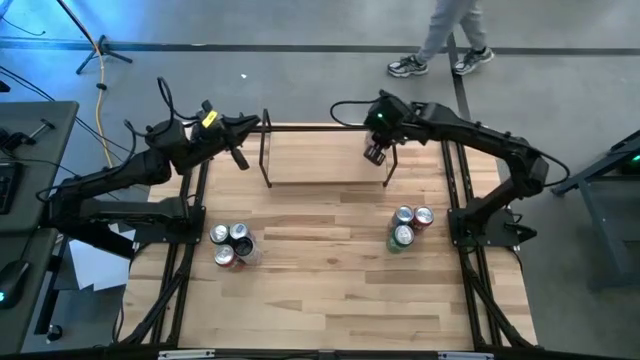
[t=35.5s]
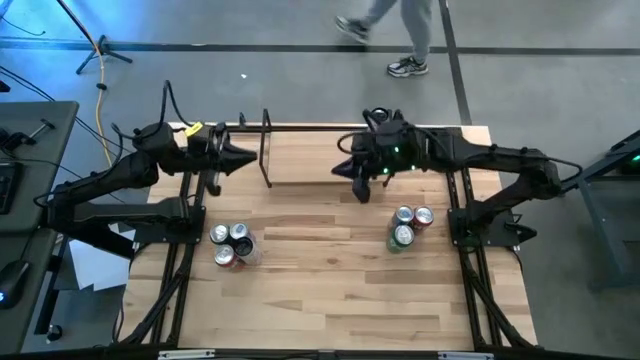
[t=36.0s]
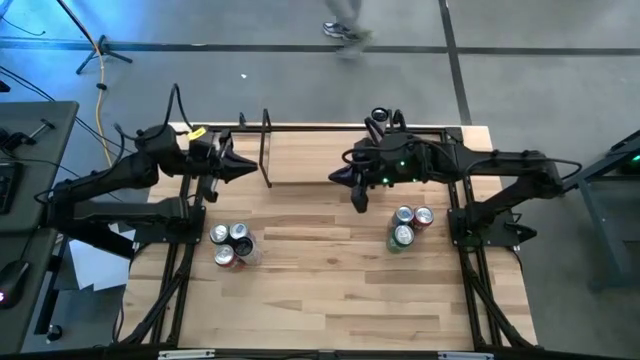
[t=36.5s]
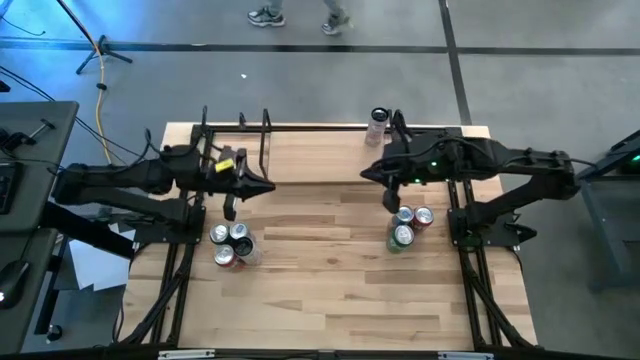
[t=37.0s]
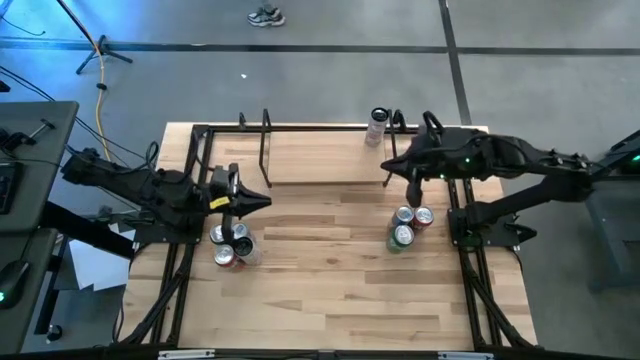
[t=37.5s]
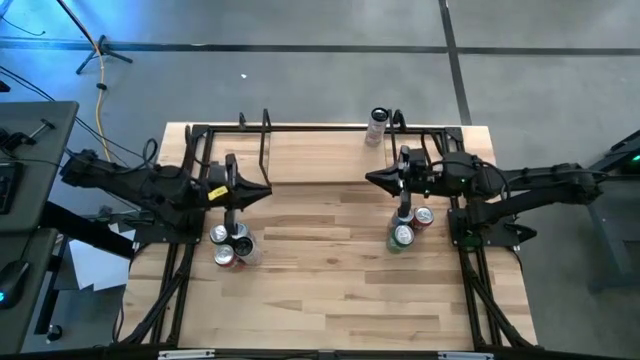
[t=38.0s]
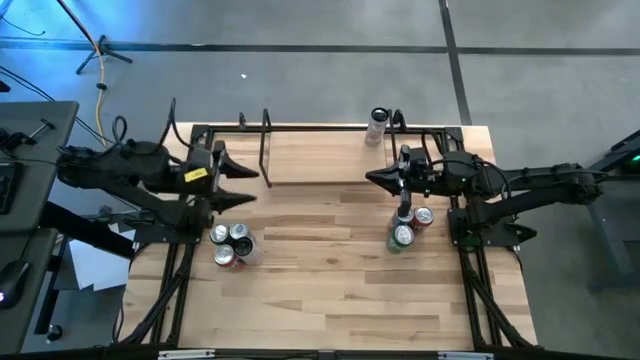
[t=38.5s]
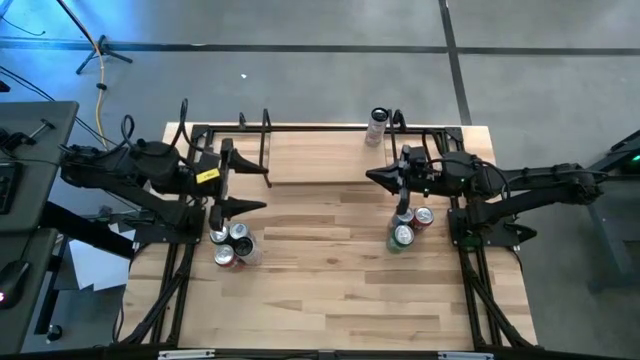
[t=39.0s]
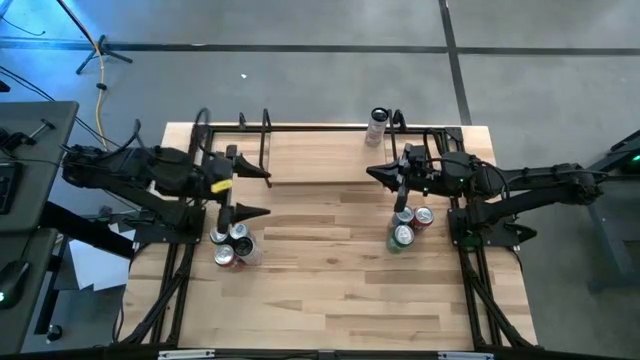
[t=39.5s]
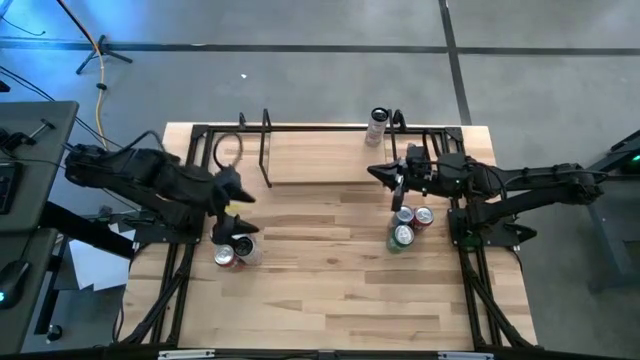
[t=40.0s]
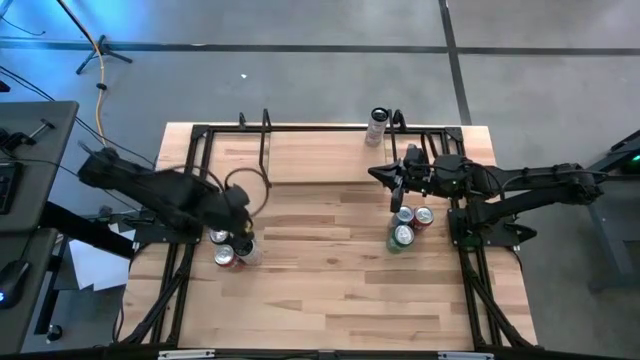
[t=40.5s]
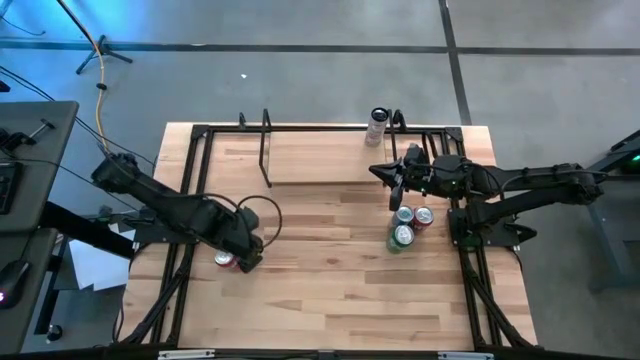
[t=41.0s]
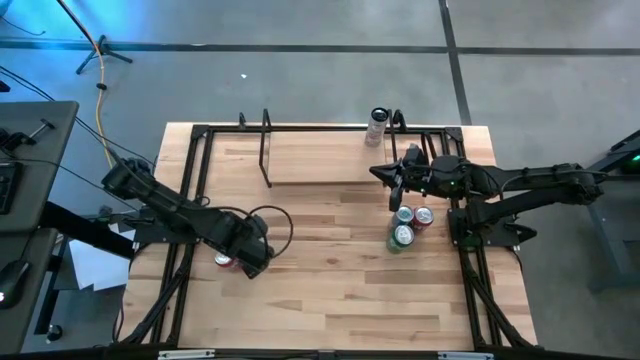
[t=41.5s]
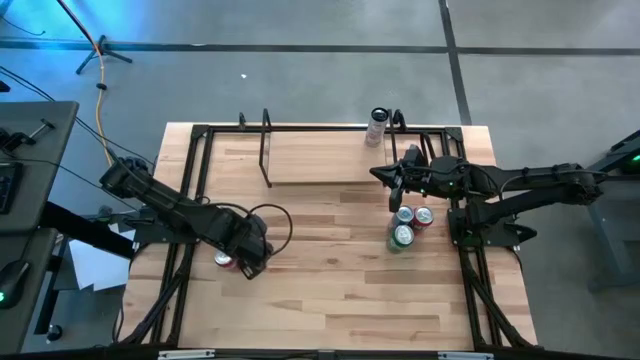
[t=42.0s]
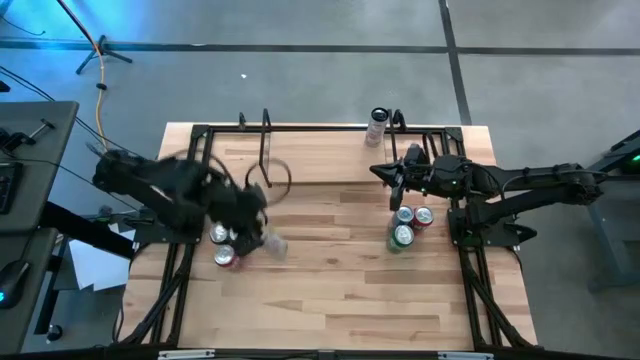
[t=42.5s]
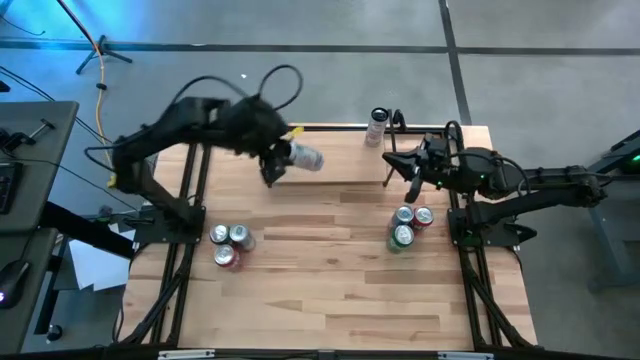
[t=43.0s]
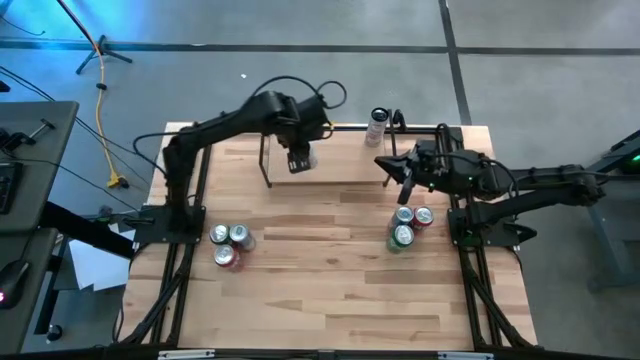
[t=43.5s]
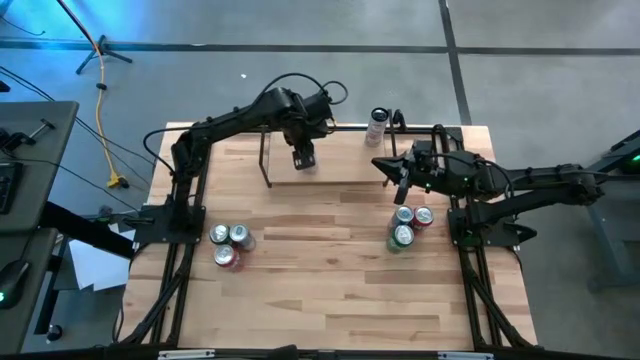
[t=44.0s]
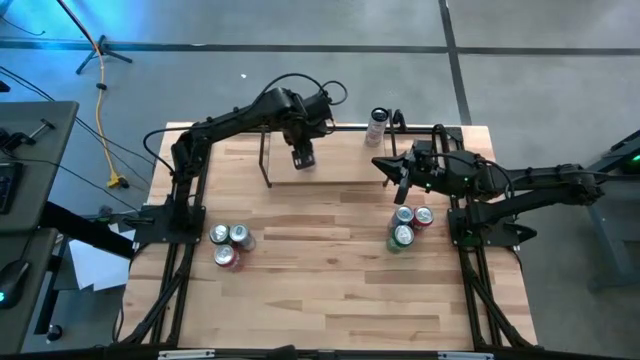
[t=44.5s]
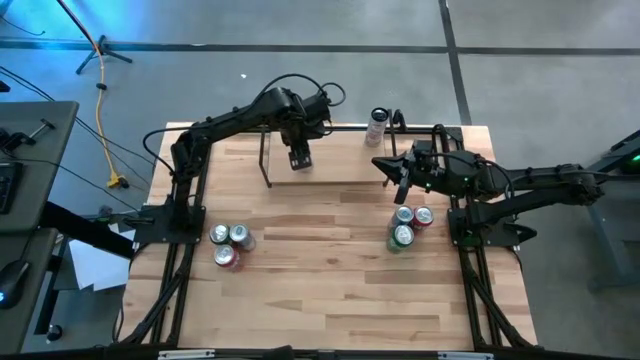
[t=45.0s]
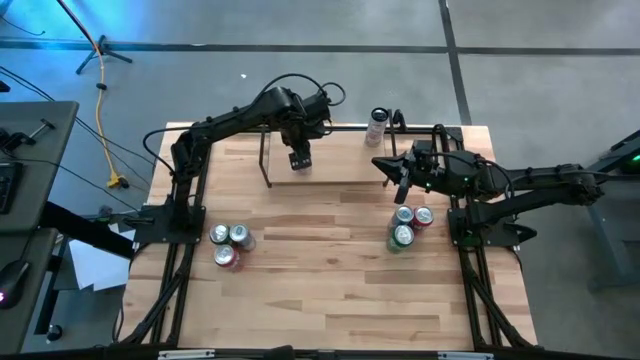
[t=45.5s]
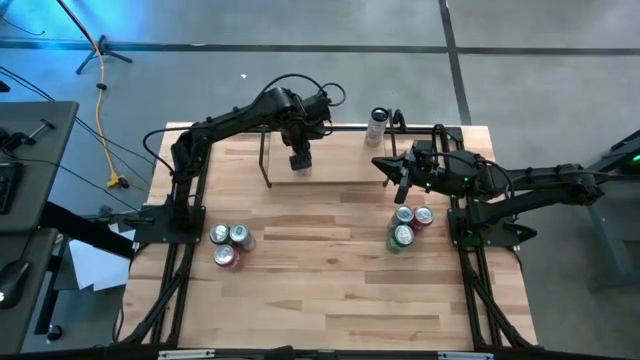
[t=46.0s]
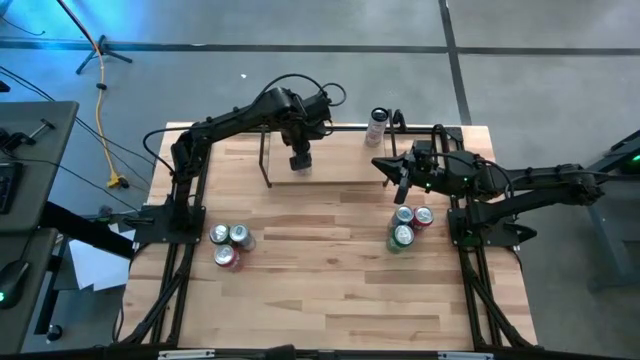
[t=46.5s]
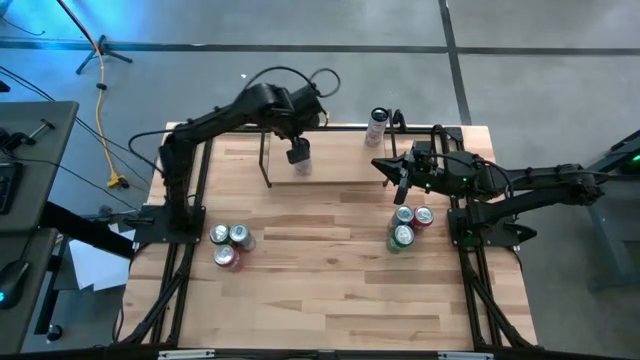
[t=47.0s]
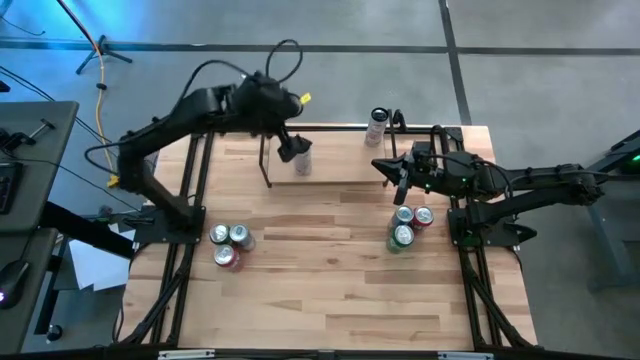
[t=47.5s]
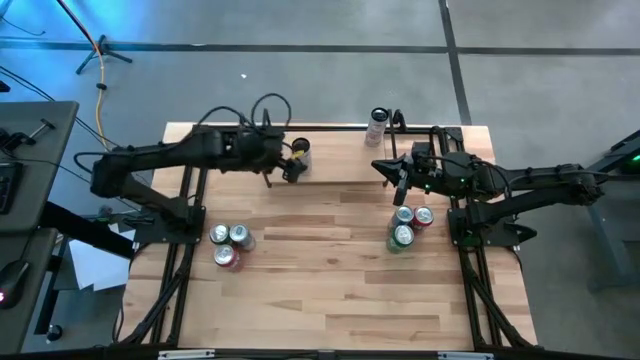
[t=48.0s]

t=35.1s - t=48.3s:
Task: Place canned beverage on shelf
Put the white soda can on the shelf and align it with the other white soda can

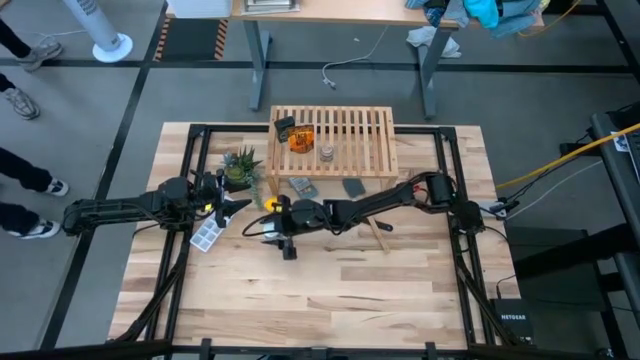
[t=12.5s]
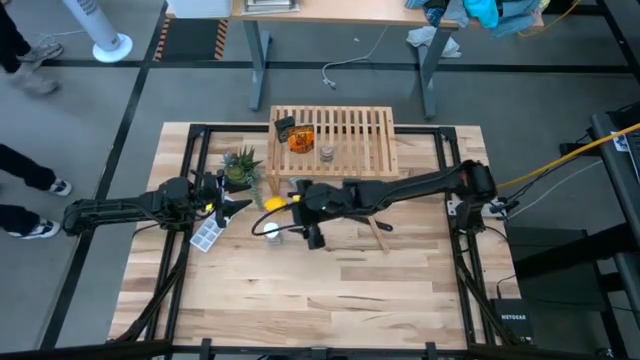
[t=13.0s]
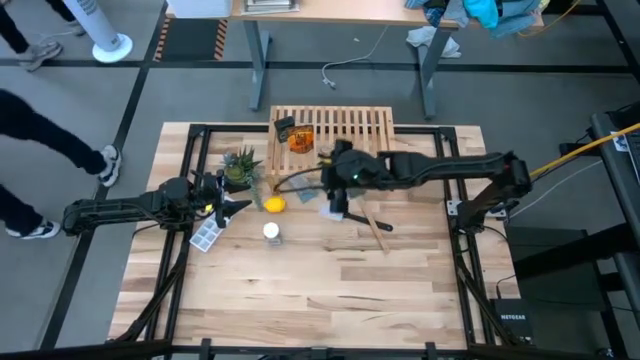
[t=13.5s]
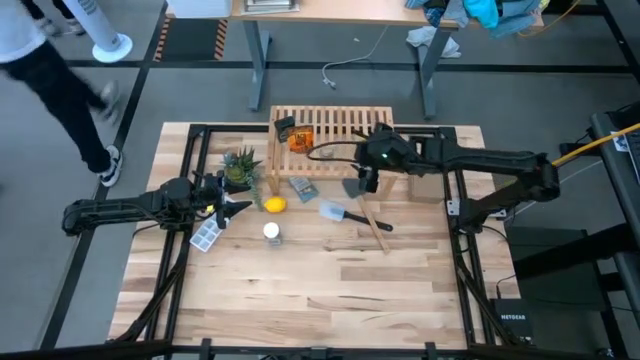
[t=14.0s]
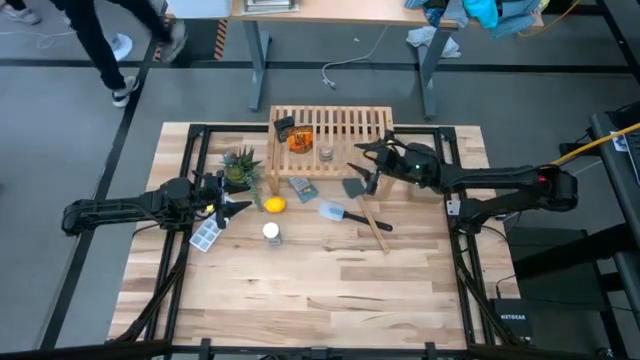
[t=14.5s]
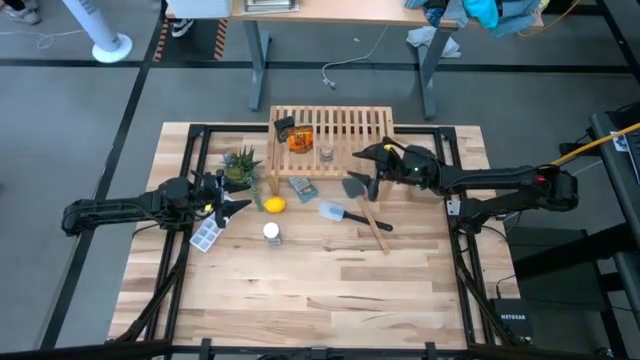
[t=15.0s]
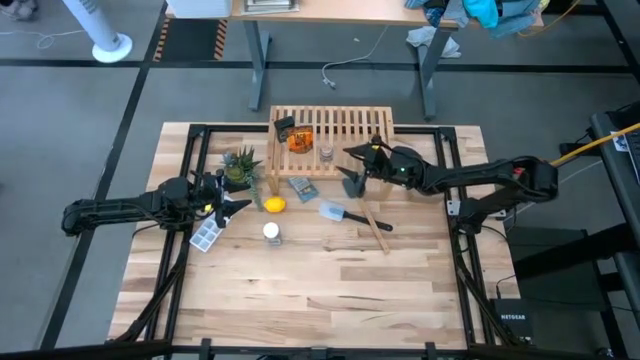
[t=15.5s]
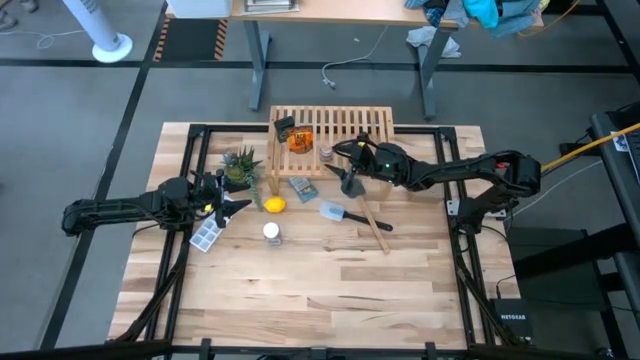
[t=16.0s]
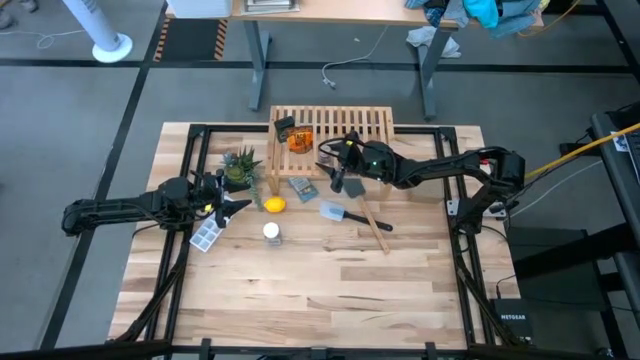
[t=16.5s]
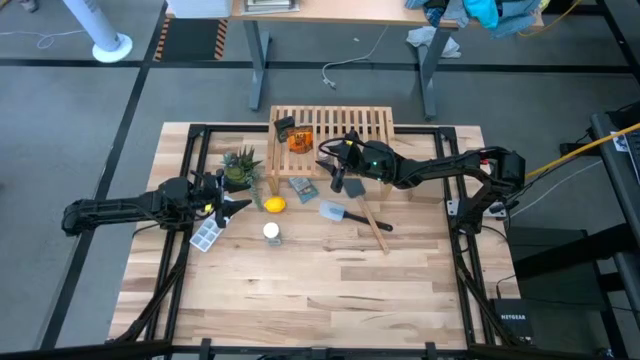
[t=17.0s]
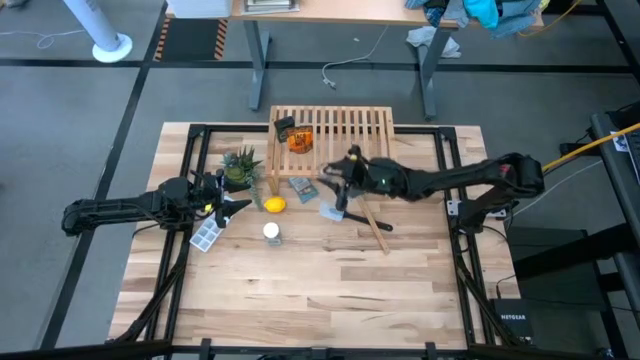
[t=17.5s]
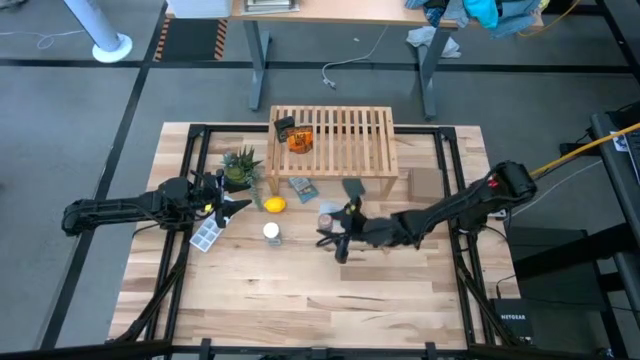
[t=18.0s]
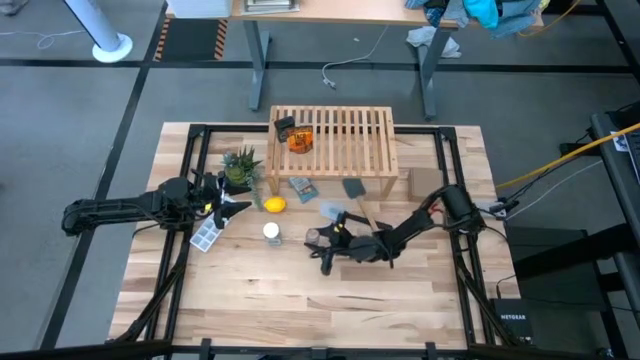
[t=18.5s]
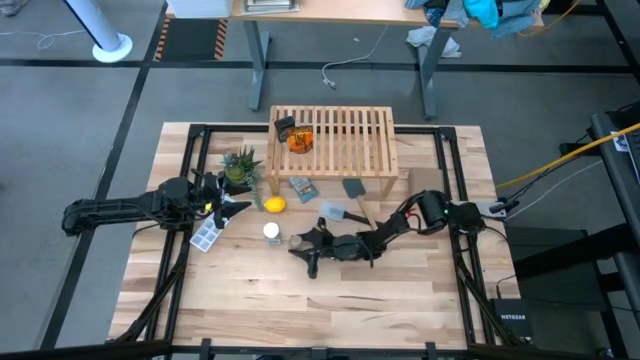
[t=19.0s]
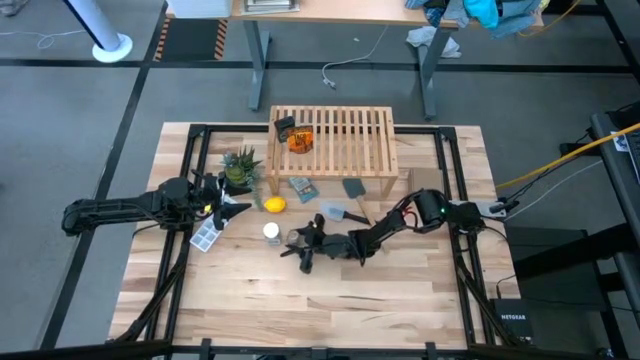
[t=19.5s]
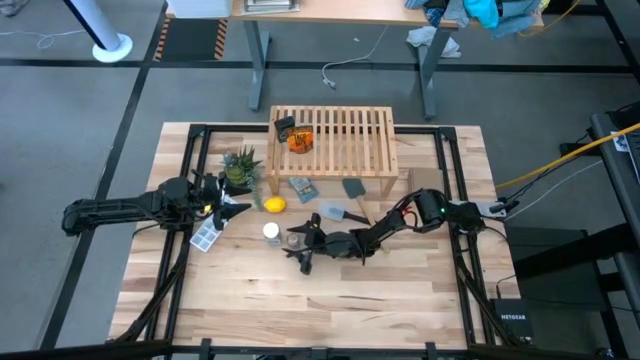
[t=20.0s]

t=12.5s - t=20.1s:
Task: Shelf spices
Remove the brown seasoning bottle from the shelf
